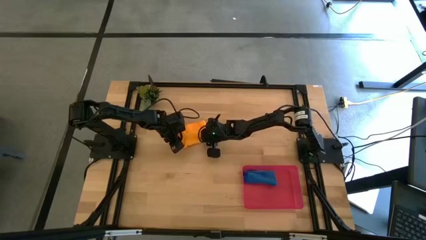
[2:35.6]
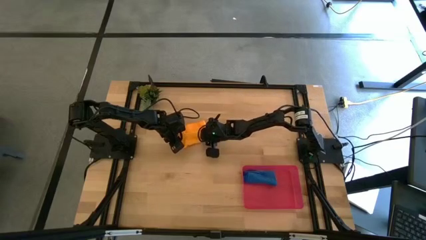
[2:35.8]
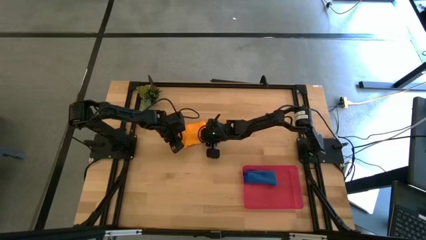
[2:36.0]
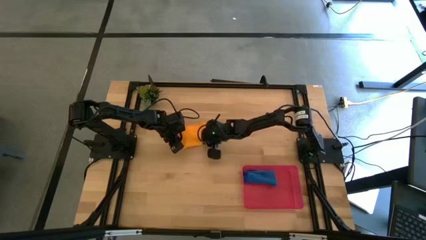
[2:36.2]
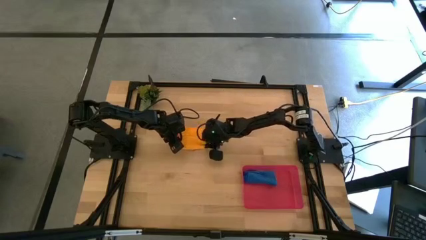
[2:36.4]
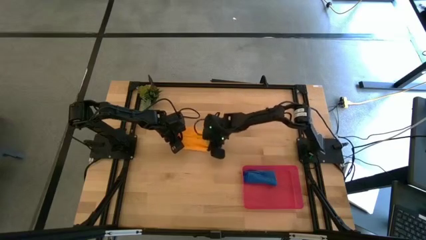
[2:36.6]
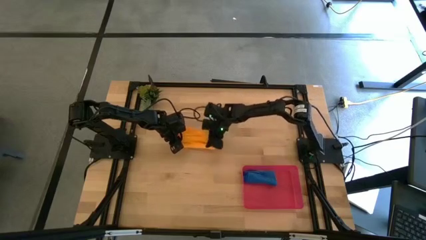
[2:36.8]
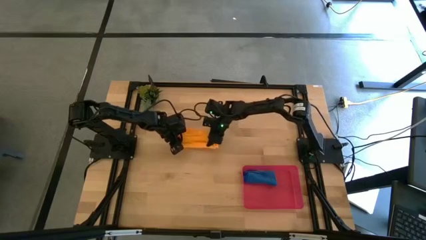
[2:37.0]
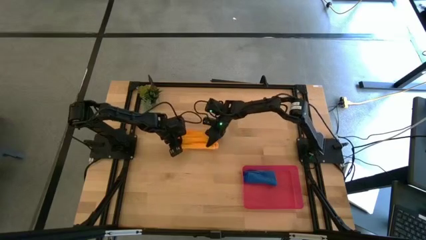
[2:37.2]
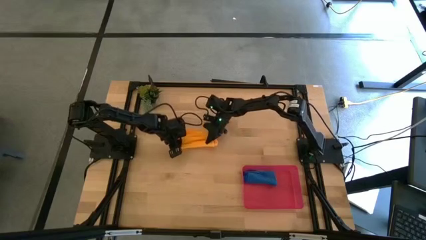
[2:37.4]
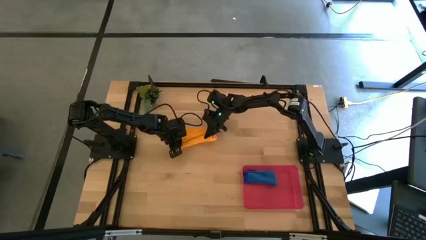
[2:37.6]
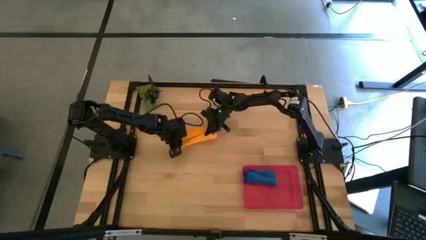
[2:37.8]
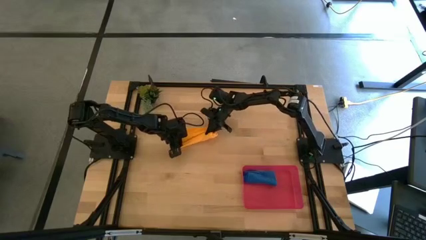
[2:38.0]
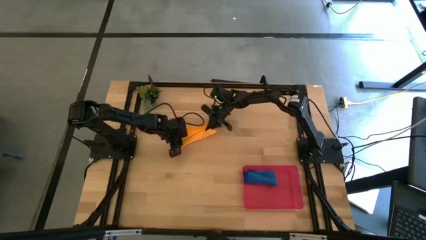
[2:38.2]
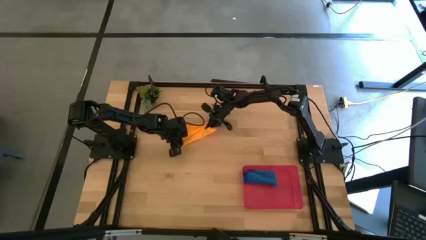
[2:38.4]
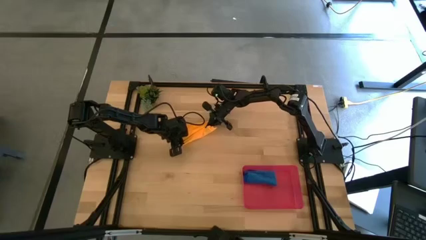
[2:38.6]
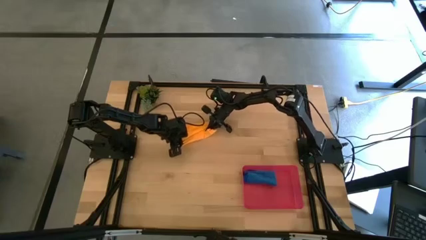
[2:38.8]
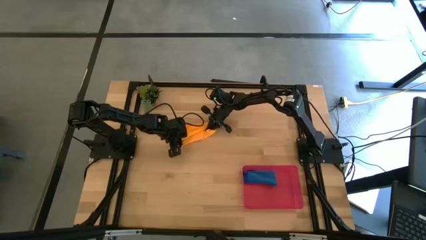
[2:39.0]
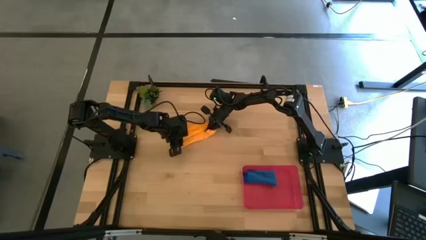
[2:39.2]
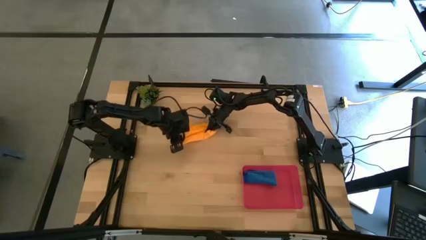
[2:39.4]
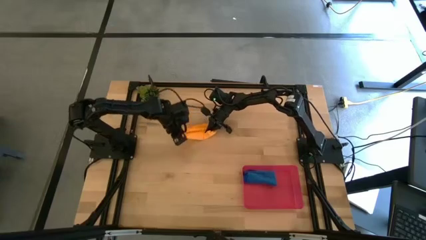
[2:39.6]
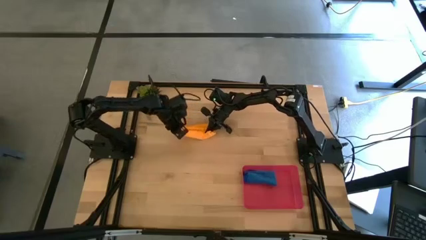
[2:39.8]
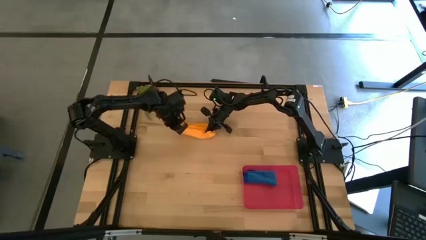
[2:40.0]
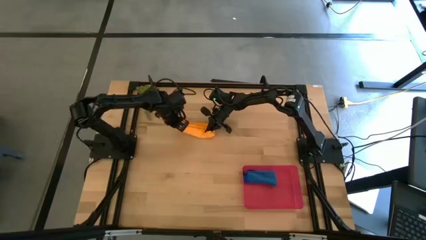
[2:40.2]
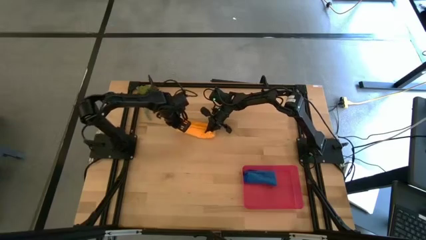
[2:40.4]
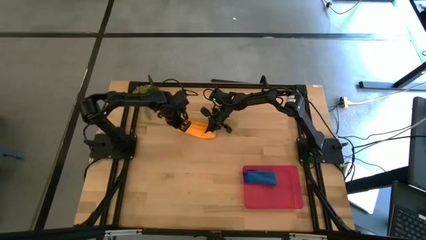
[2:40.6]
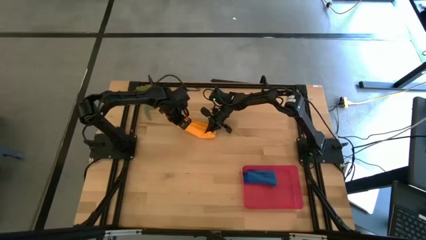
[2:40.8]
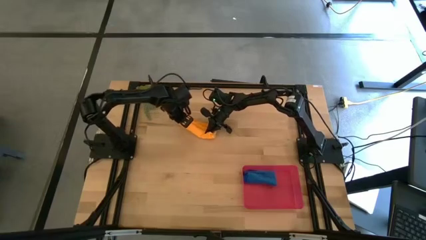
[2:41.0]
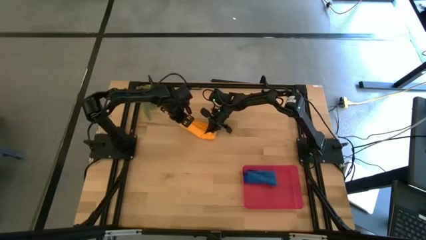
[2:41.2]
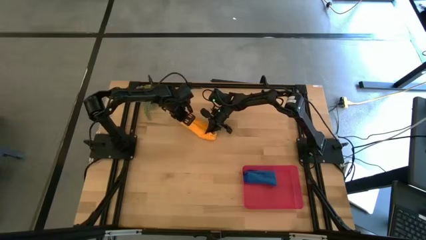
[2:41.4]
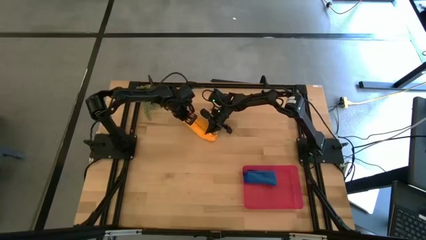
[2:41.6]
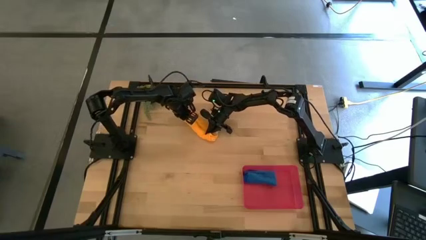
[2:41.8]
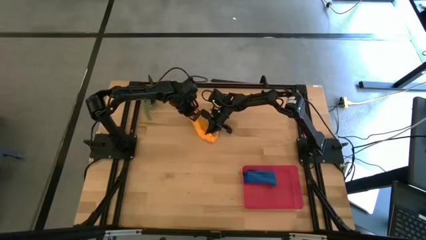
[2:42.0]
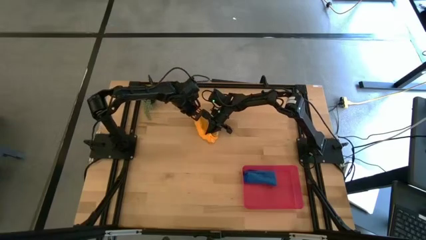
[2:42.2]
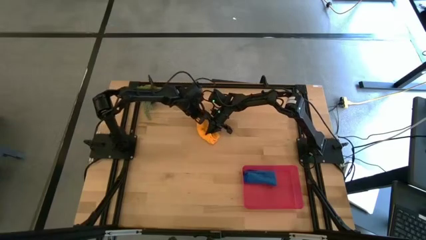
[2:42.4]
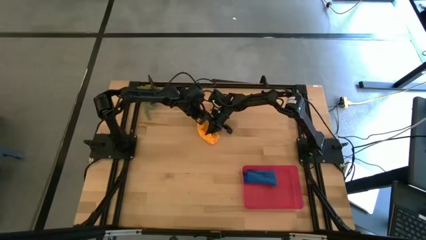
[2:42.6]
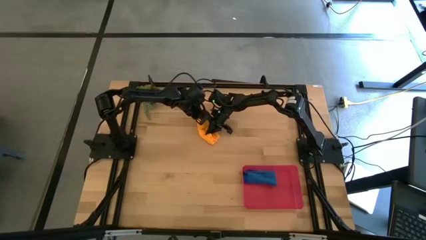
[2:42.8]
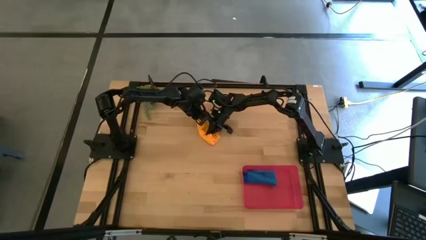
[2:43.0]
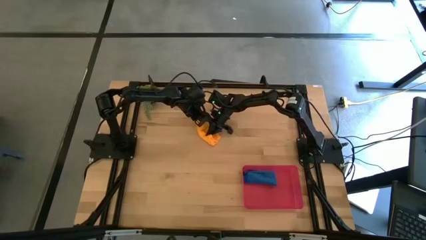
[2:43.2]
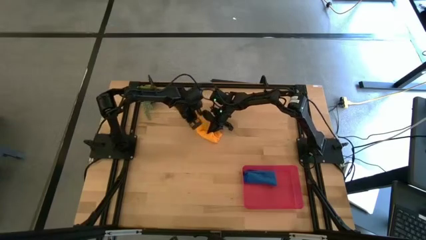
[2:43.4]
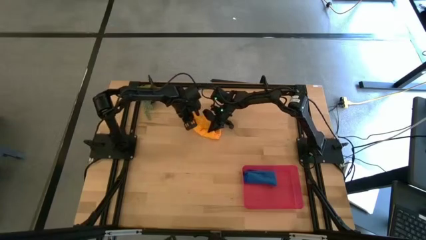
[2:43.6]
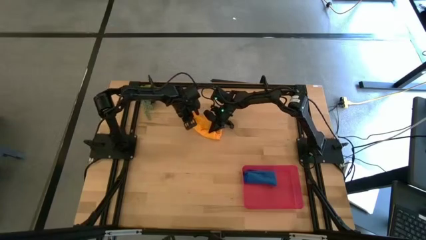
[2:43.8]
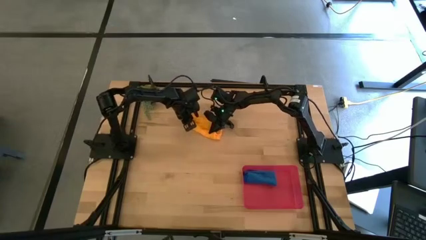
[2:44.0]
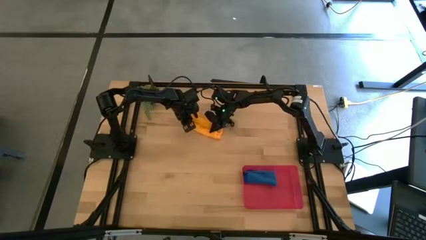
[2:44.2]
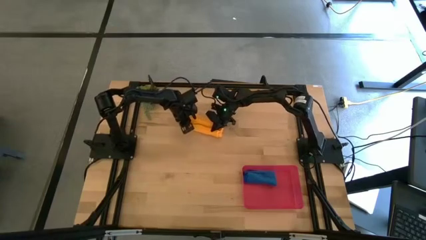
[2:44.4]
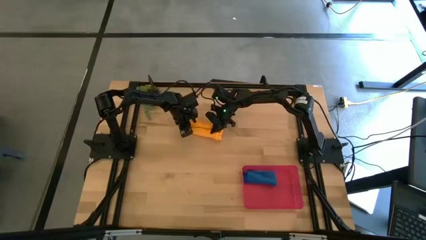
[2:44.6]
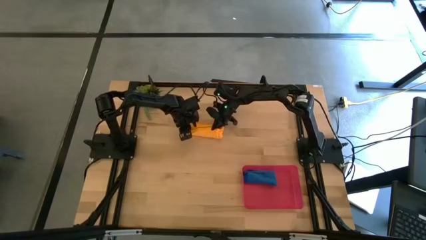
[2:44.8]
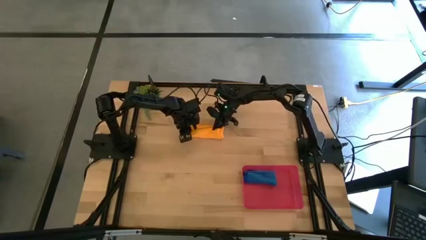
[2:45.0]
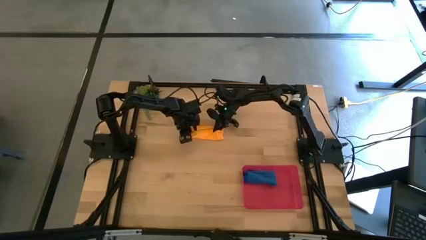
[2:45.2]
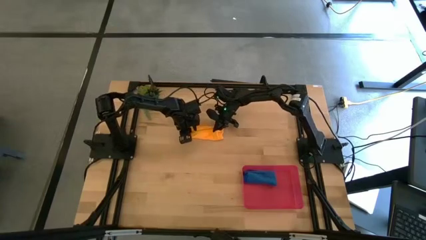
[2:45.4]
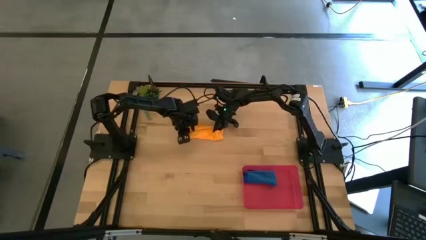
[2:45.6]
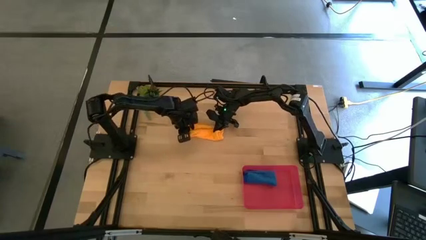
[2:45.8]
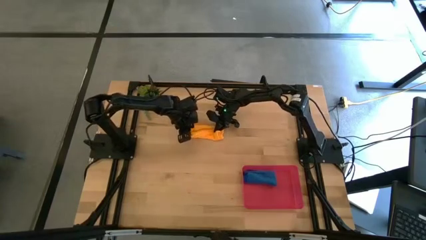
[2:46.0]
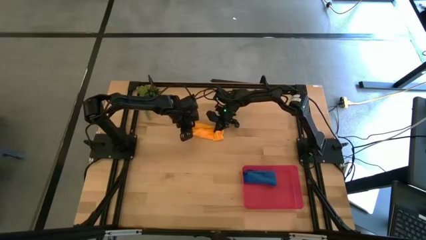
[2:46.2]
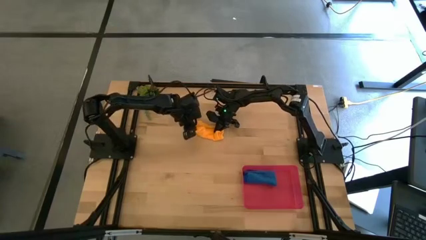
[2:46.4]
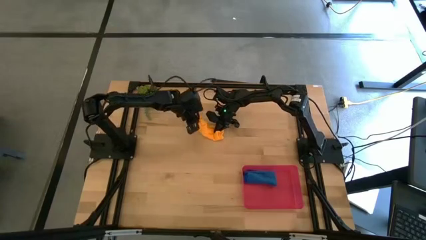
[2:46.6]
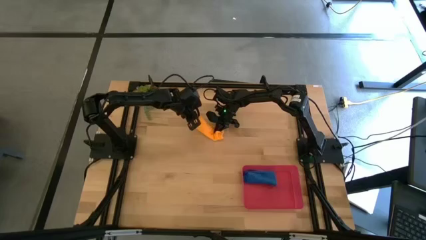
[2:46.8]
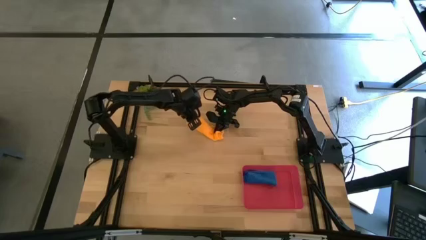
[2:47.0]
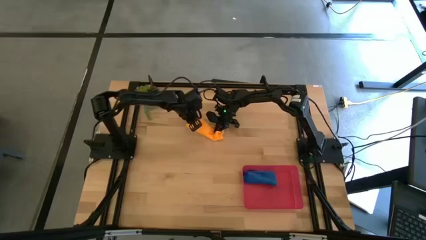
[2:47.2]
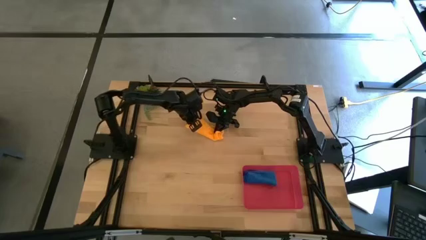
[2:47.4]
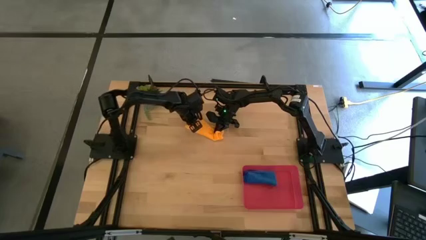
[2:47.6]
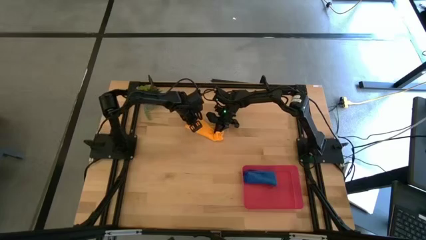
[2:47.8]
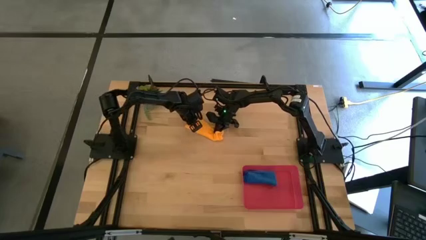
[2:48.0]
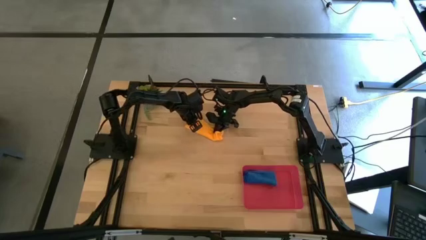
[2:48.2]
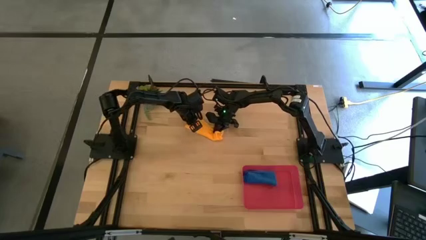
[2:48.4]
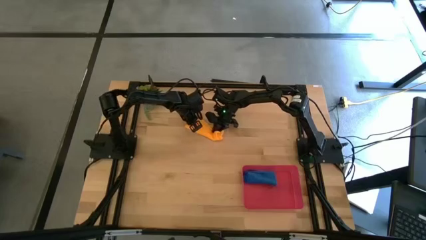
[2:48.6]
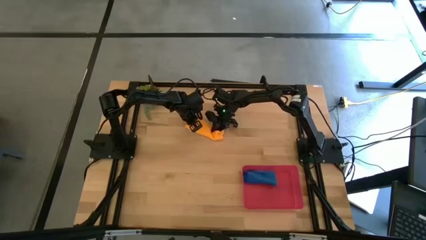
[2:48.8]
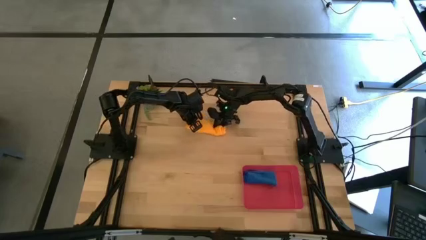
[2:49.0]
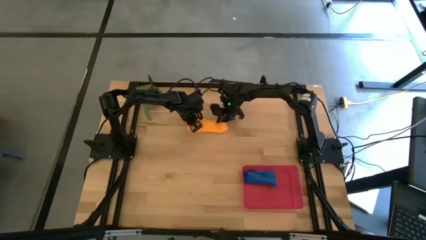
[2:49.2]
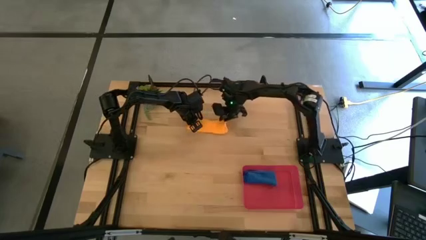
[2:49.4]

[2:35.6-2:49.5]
Task: Roll microfiber towels into tight, uniform cylinder then place into a basket
Roll the orange microfiber towel

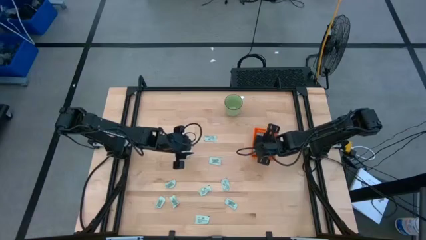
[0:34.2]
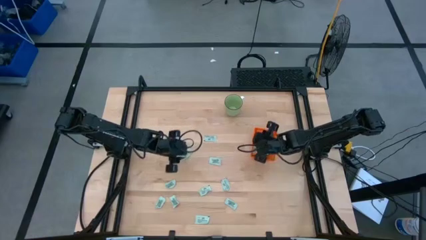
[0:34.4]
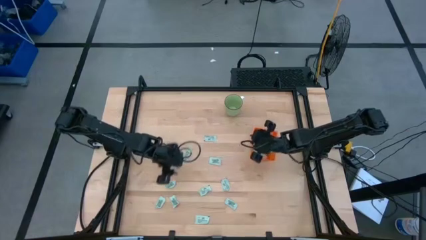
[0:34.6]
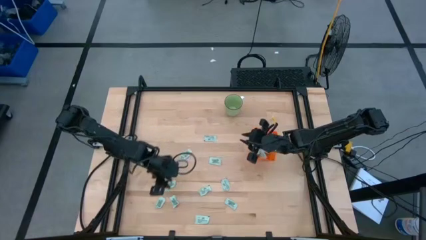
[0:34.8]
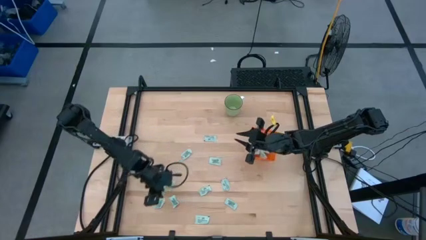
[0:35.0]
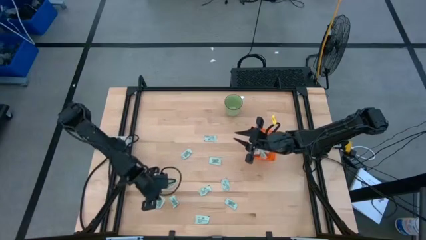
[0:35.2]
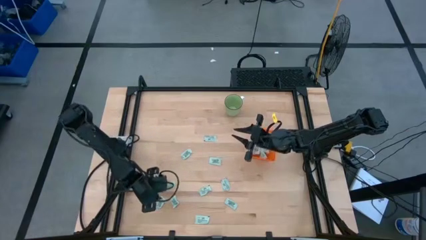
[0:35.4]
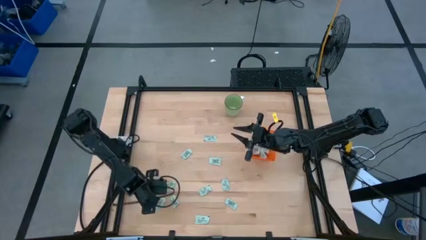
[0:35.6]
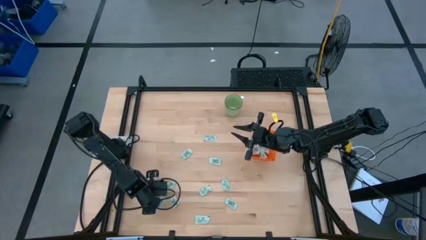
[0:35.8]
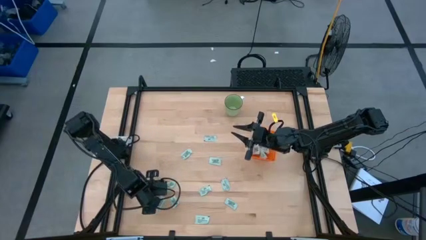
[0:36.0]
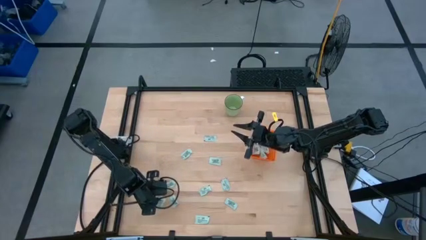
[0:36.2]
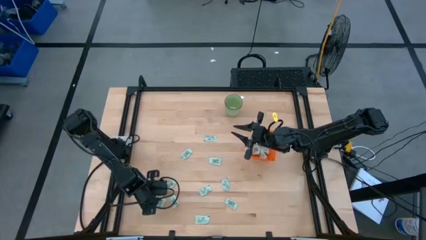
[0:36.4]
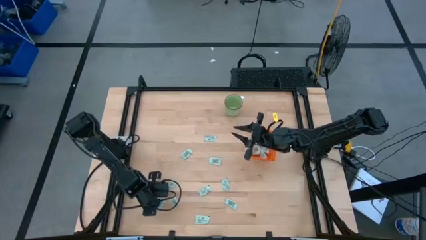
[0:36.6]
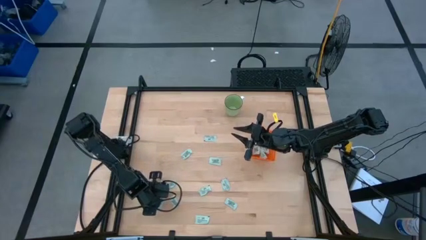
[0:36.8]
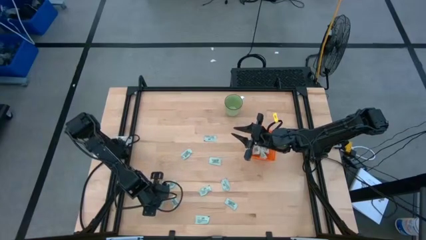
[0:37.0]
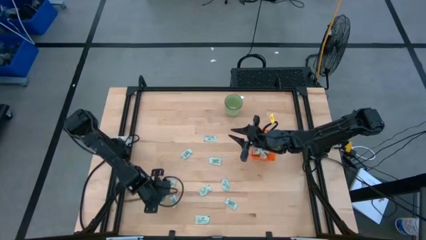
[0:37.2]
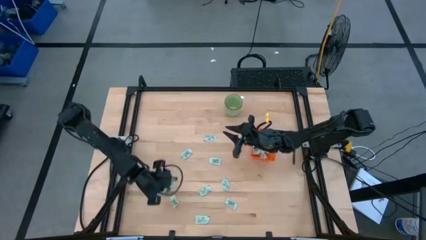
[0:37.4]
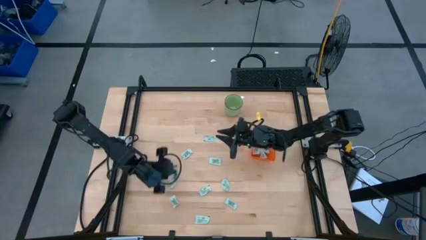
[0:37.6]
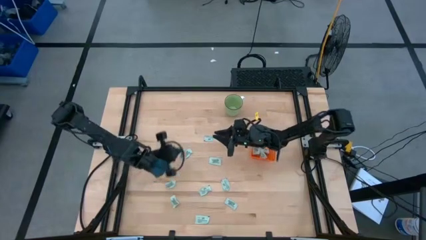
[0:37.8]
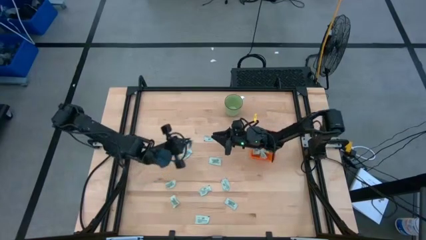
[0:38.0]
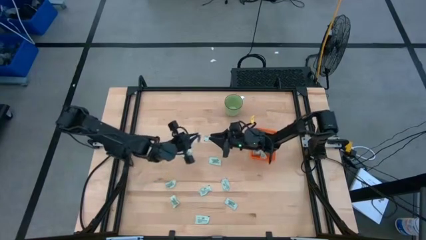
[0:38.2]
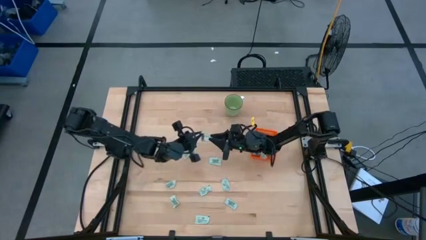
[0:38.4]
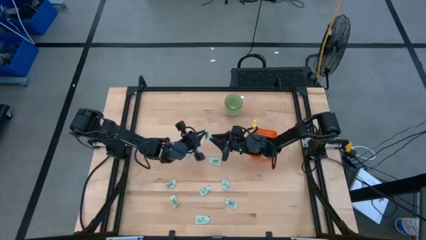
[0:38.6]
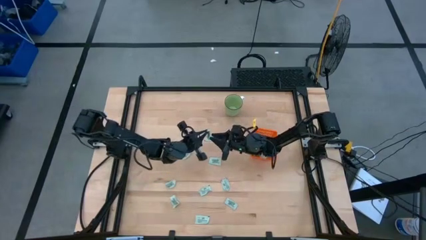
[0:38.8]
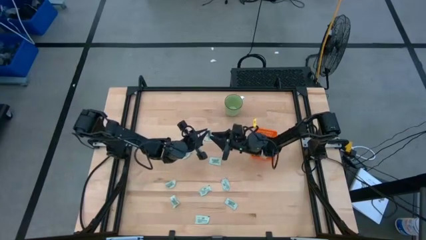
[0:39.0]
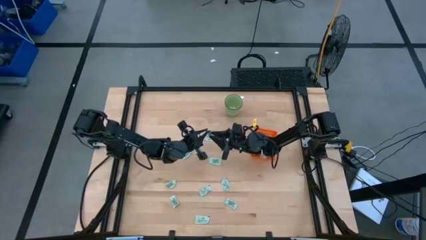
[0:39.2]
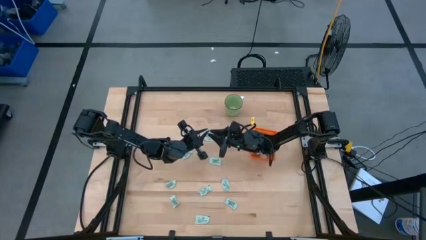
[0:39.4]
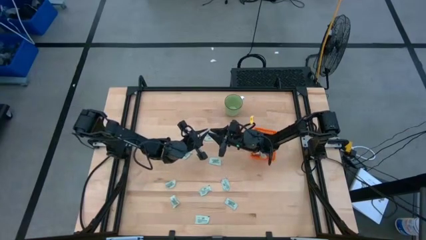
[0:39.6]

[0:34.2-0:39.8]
Task: Pick and place Stevia / Truvia into bins
Put the light green packet into the orange basket
